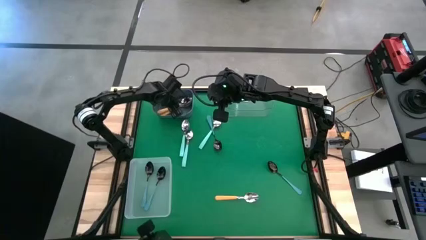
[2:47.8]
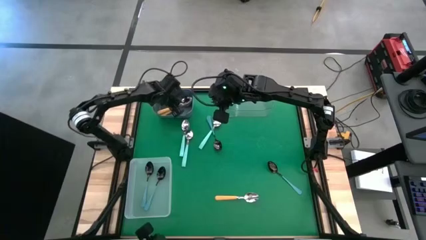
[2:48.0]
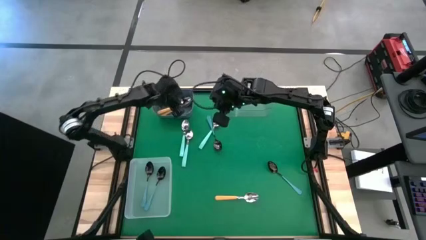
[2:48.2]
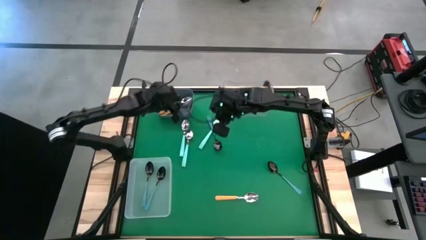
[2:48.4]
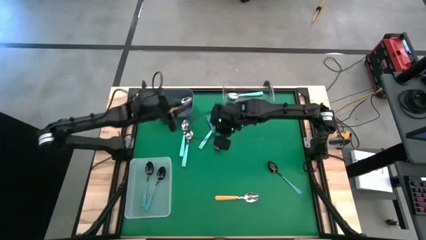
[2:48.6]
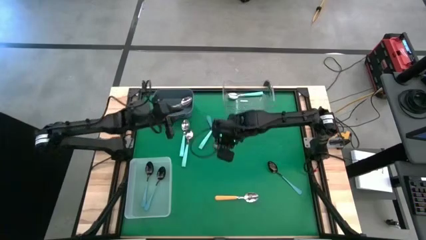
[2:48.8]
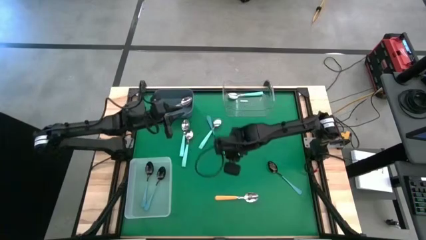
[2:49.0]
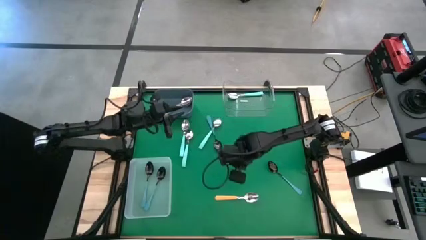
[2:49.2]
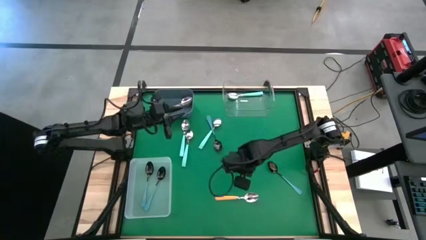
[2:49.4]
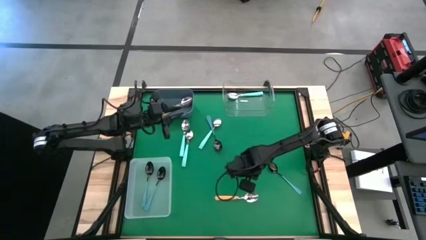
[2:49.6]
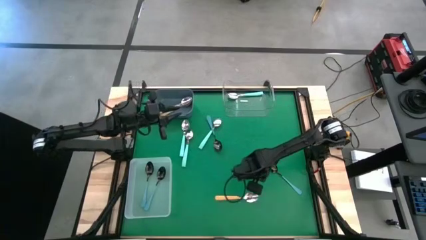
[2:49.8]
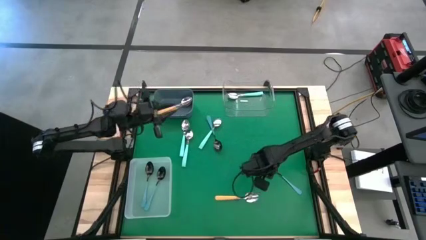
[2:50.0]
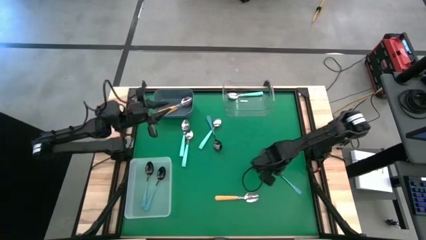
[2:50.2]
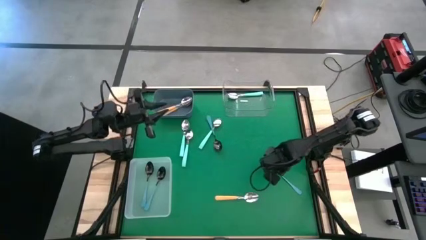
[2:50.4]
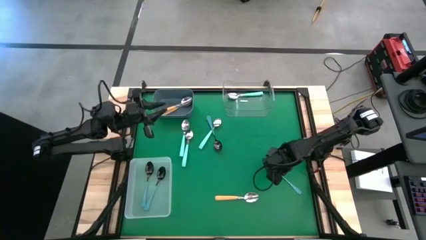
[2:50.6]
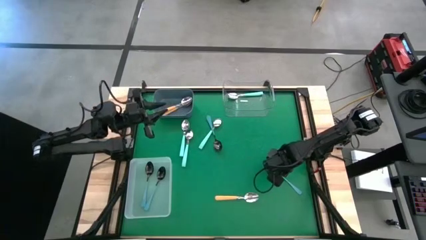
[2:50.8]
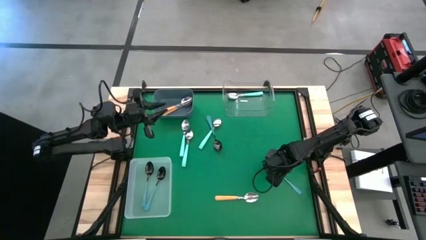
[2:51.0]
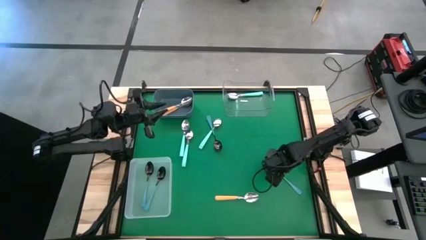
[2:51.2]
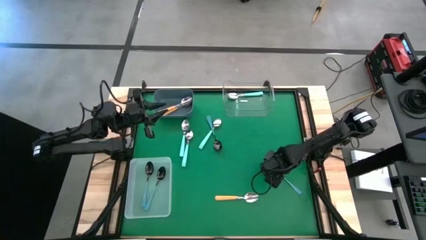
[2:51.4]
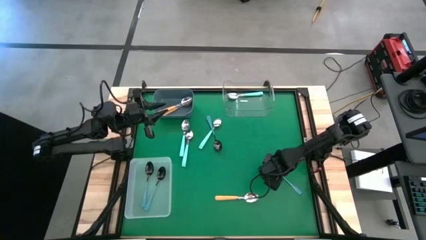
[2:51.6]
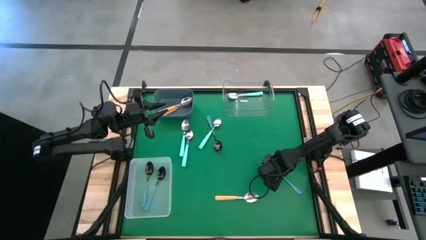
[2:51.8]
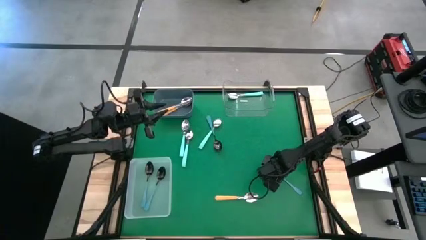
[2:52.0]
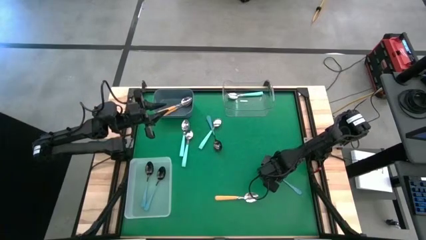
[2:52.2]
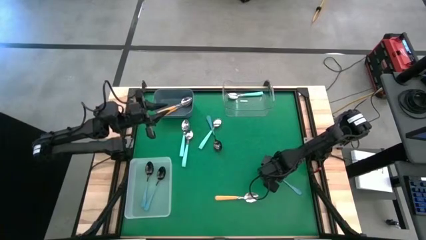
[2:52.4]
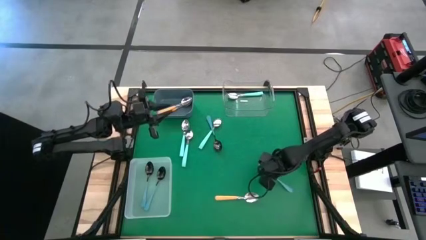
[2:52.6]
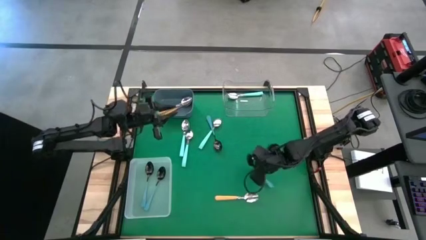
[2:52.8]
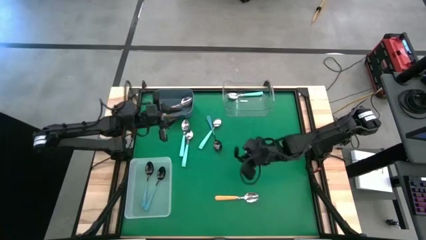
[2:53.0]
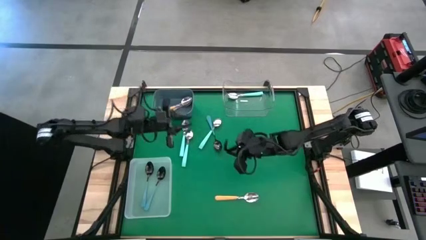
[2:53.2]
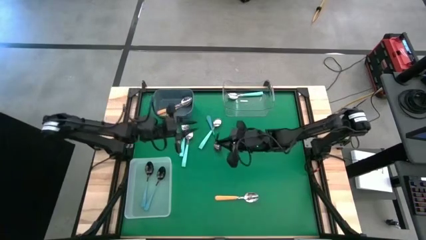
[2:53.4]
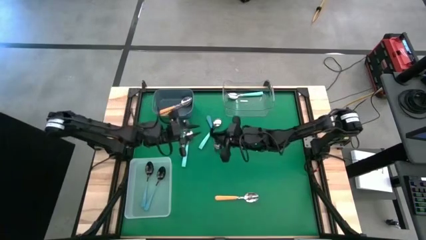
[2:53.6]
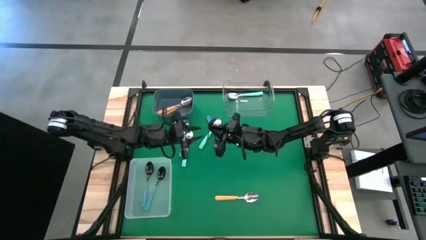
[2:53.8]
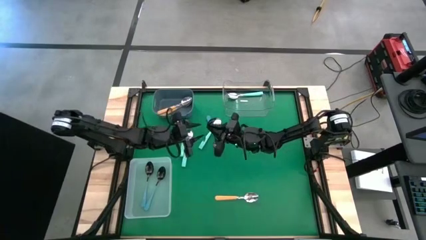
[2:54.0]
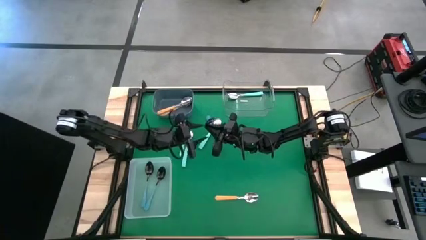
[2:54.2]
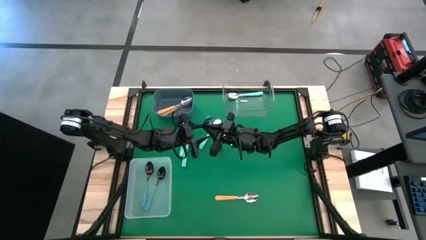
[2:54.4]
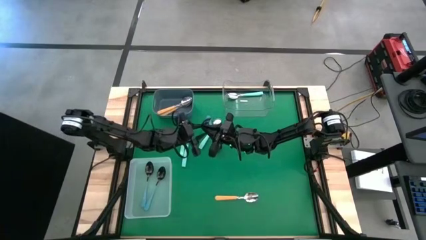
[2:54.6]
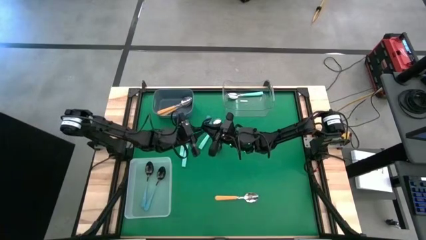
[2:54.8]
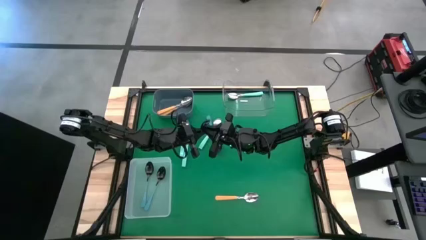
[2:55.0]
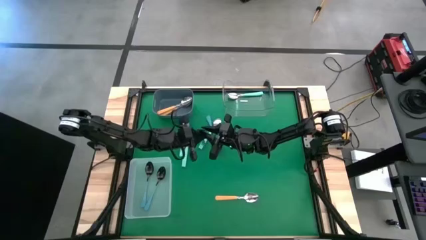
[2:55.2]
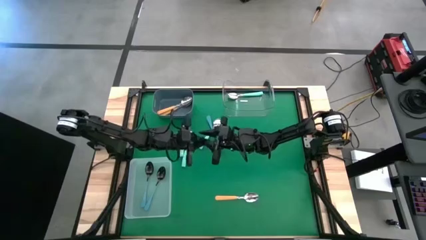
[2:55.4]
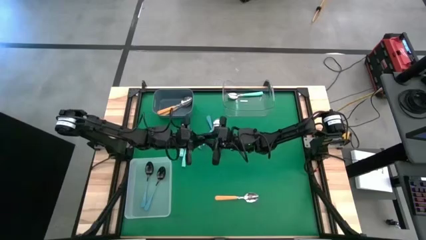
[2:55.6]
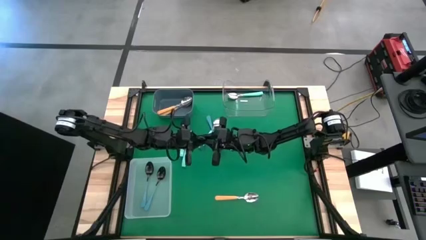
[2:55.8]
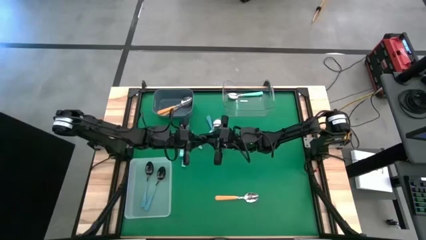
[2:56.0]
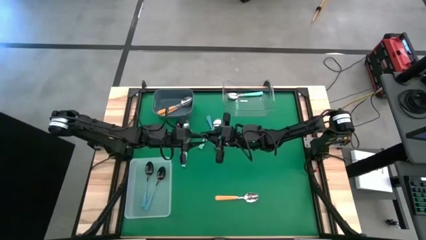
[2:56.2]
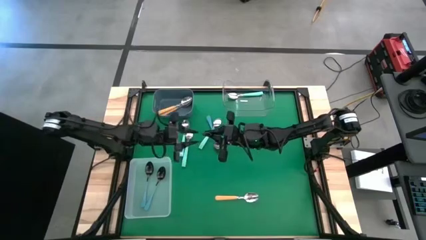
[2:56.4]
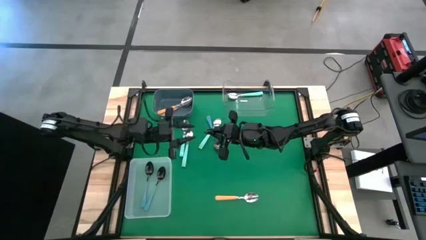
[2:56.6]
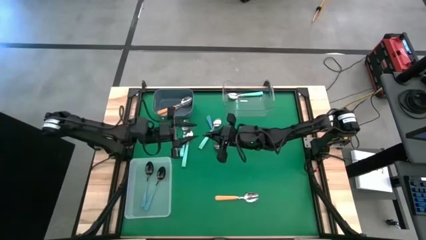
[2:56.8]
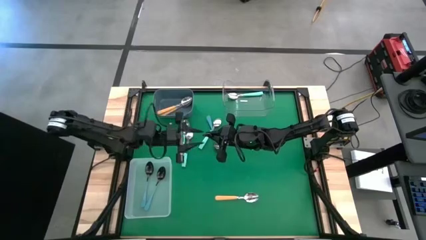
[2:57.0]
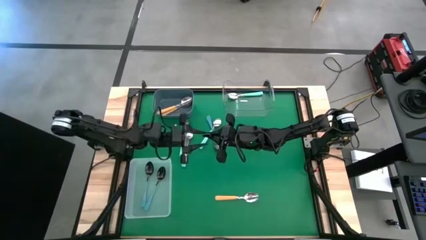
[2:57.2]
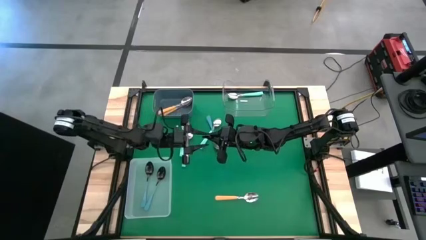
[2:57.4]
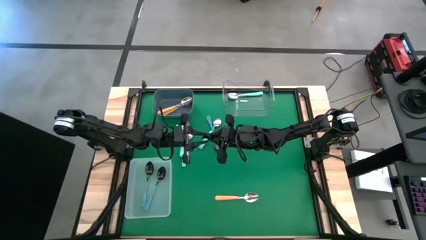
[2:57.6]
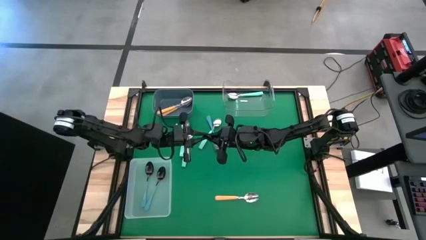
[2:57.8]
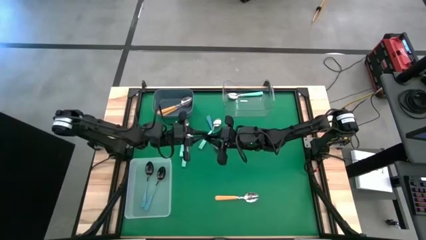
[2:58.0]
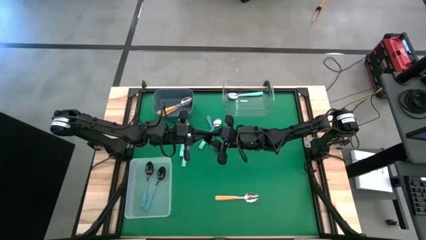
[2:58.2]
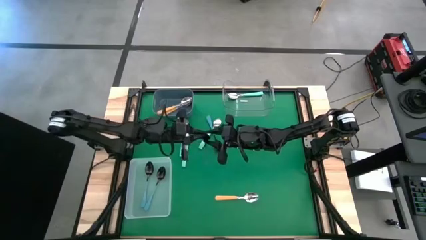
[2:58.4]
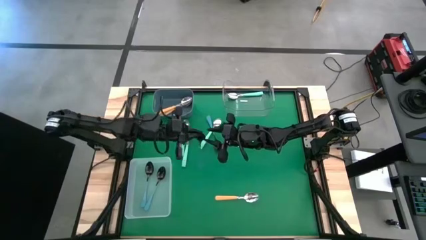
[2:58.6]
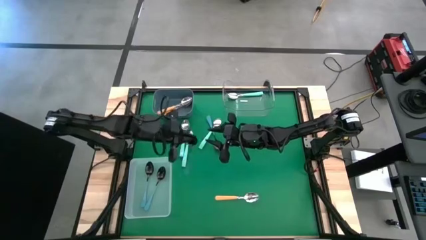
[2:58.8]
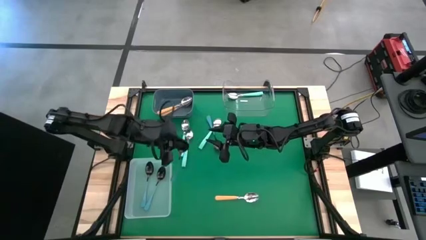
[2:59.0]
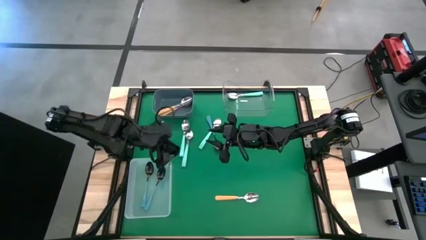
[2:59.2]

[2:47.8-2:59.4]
Task: Sort silverware by color (type)
Put the dark blue spoon into the white bin

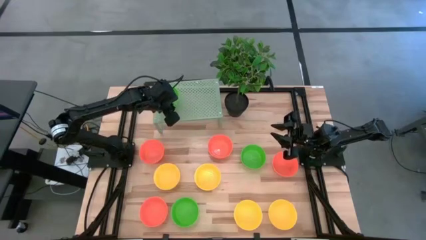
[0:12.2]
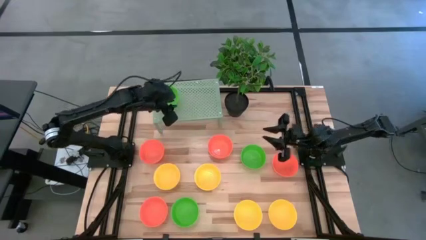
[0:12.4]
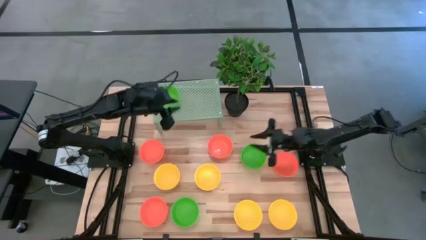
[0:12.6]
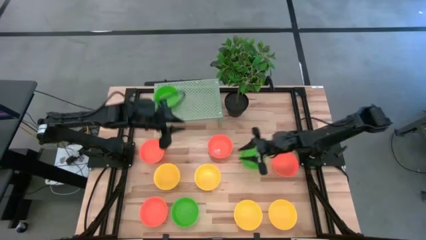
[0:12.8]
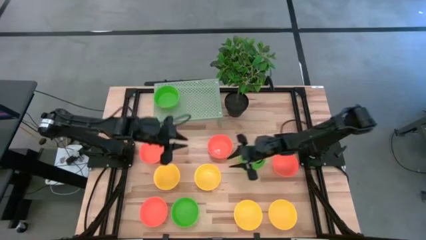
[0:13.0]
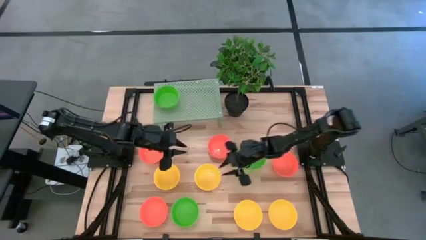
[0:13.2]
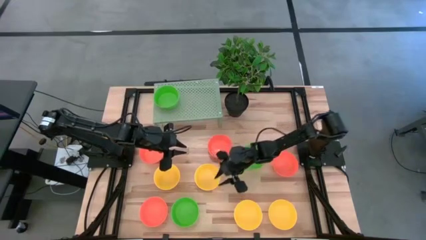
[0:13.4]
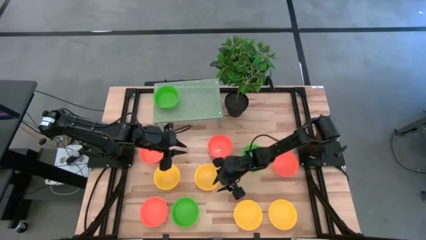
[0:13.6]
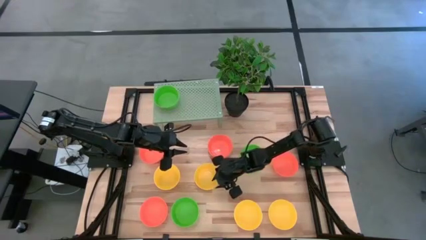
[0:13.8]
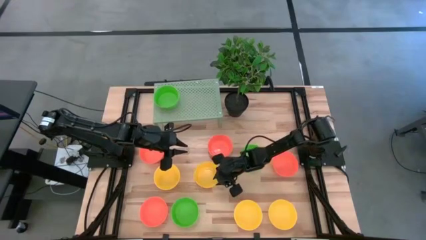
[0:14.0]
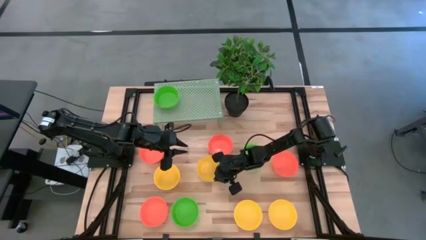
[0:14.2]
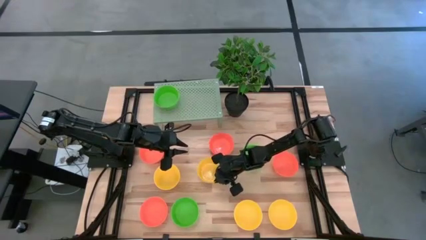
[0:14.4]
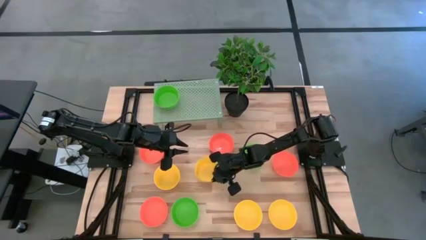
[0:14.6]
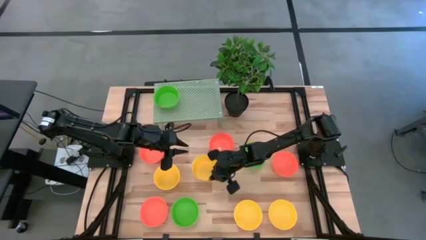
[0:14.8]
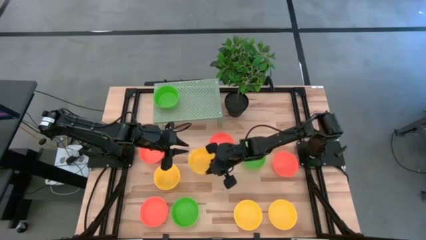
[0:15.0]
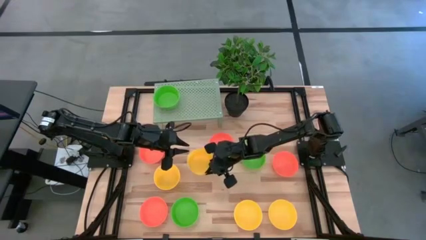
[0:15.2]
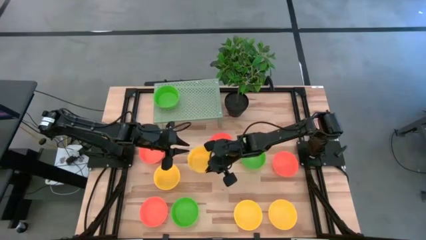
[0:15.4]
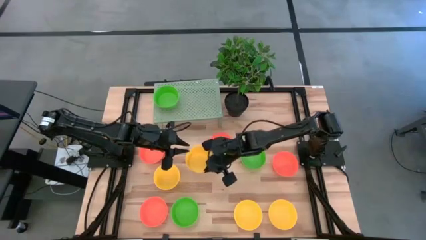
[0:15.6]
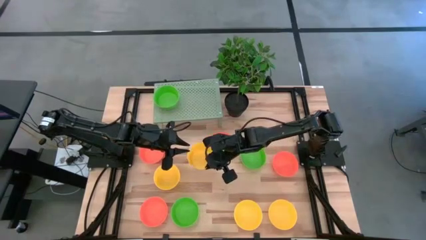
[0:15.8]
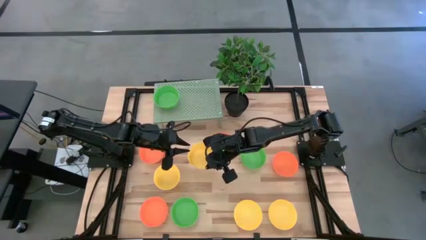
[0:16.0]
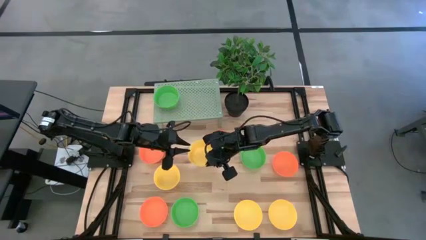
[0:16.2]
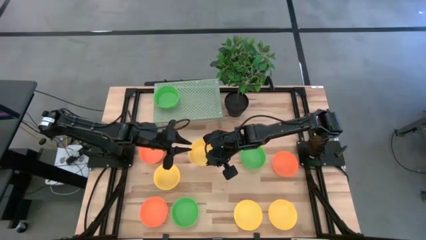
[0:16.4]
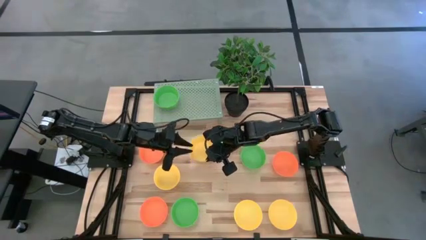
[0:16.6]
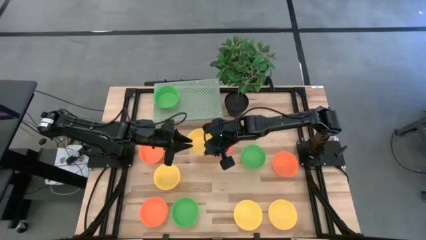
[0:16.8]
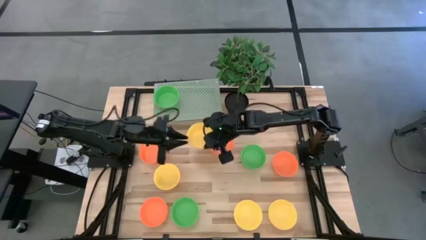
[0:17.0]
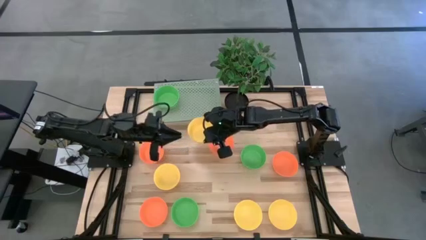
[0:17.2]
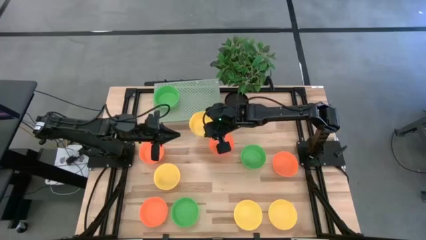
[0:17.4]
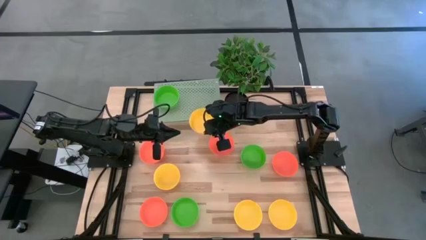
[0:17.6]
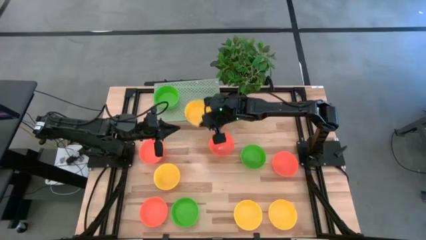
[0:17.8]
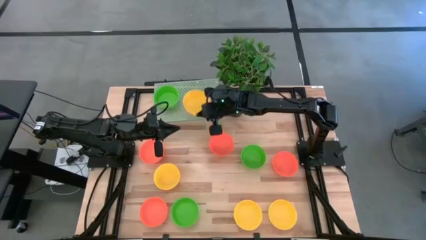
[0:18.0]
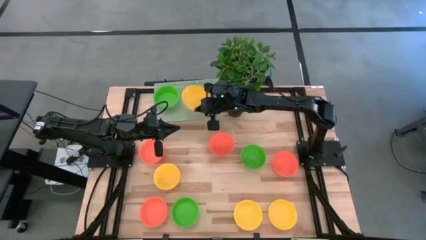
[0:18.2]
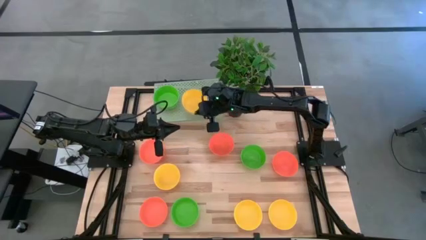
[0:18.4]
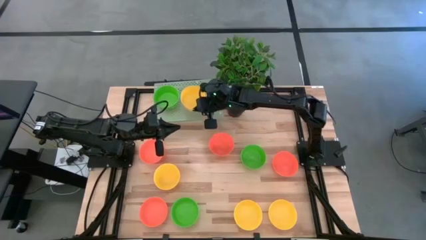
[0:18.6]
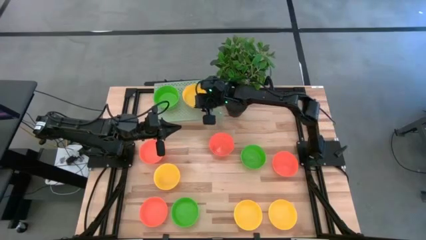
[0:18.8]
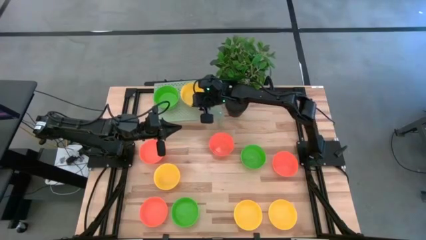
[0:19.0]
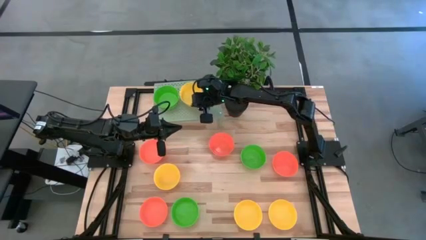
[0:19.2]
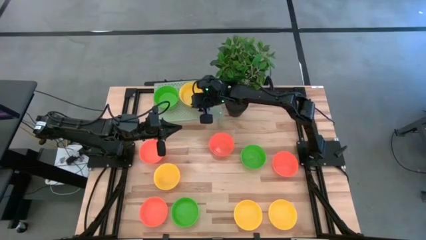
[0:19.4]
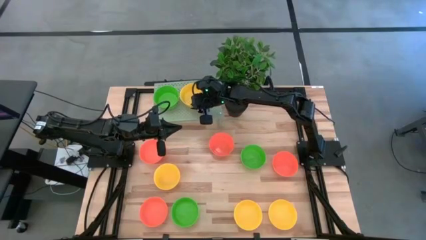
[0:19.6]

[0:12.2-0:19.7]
Task: Pick & Place Mini bowls
Put the yellow bowl on the shelf
